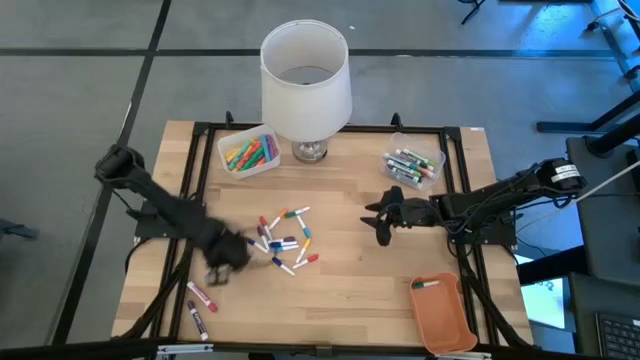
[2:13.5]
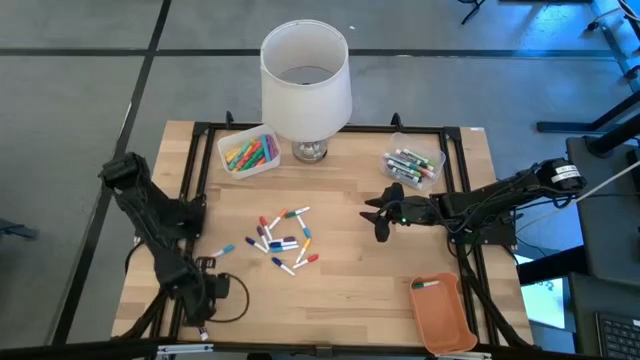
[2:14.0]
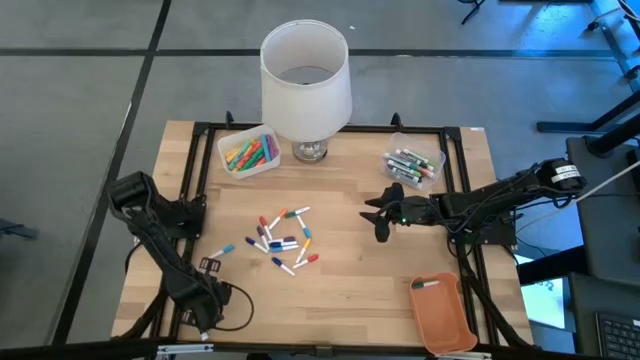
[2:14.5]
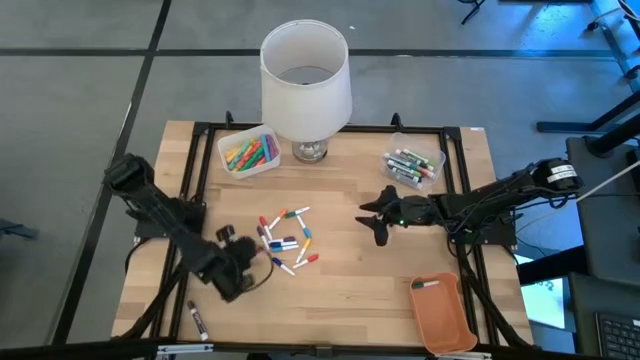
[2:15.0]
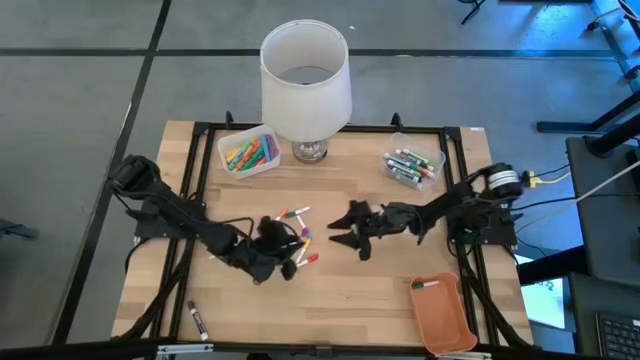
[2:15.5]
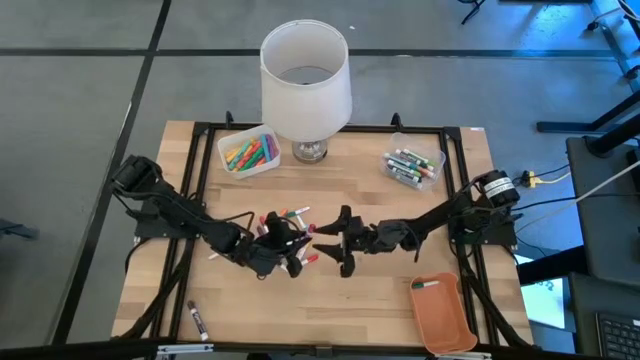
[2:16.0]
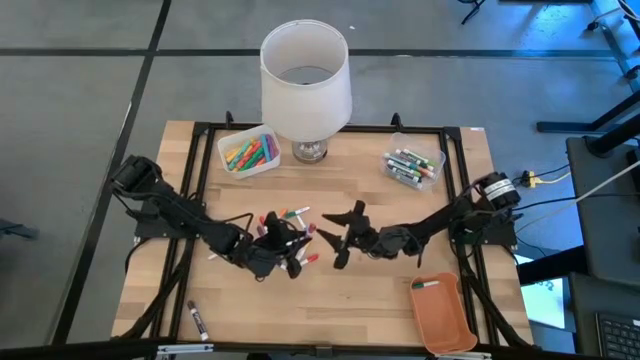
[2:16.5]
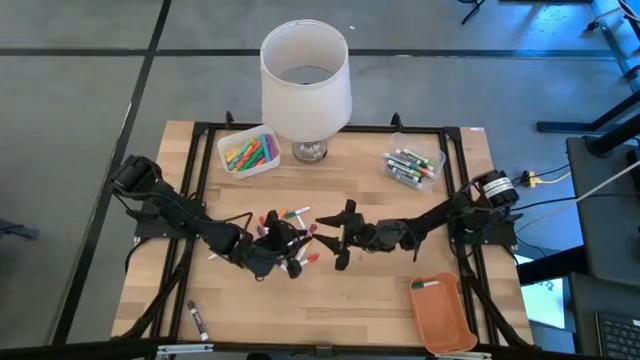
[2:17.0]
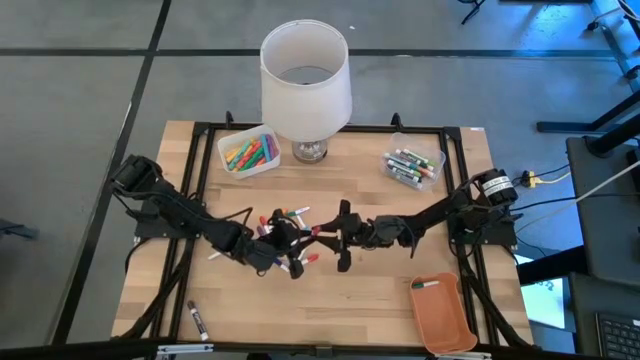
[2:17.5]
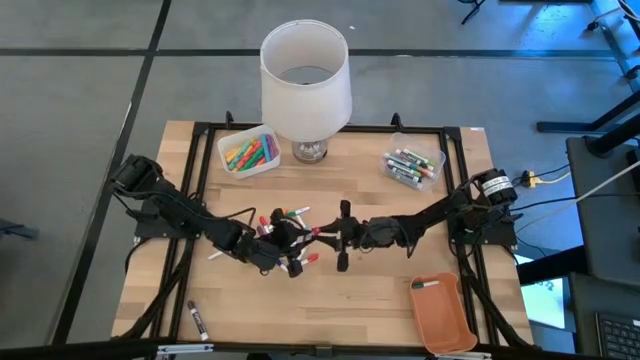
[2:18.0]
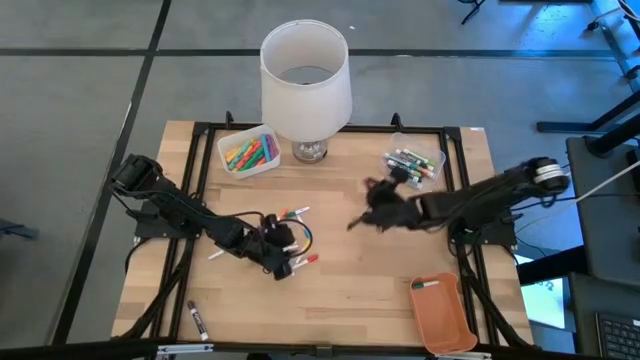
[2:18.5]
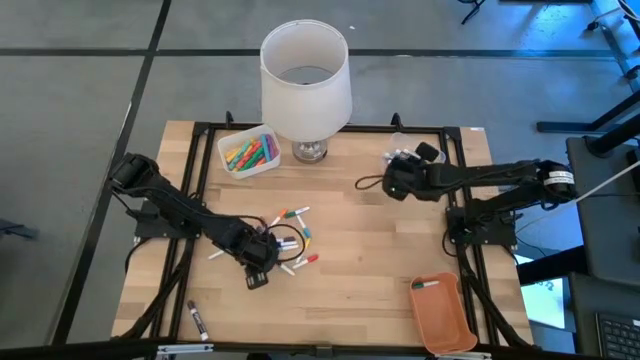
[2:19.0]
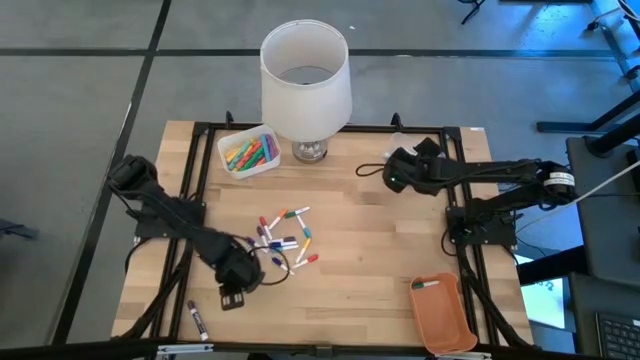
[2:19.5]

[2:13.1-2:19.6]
Task: Pick & Place Markers
Put the thick pink dry erase marker into the transparent bin

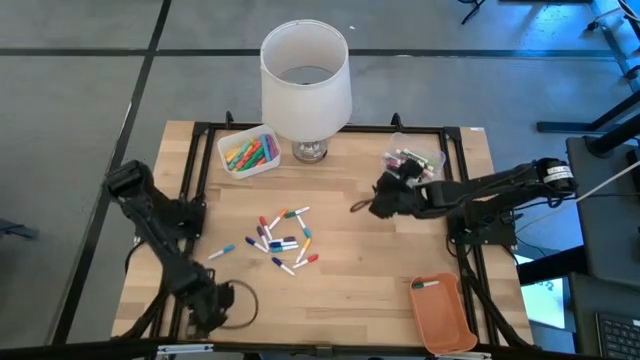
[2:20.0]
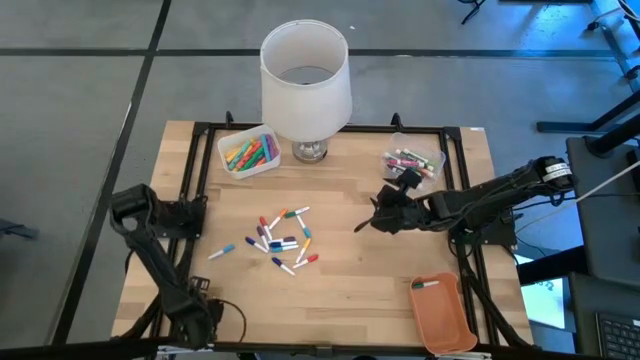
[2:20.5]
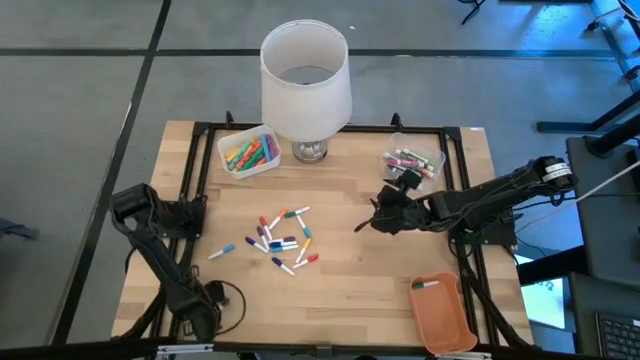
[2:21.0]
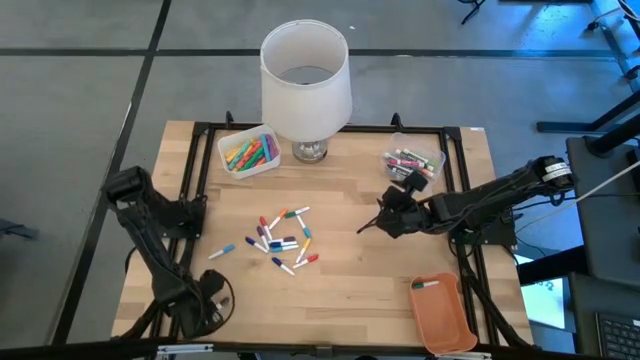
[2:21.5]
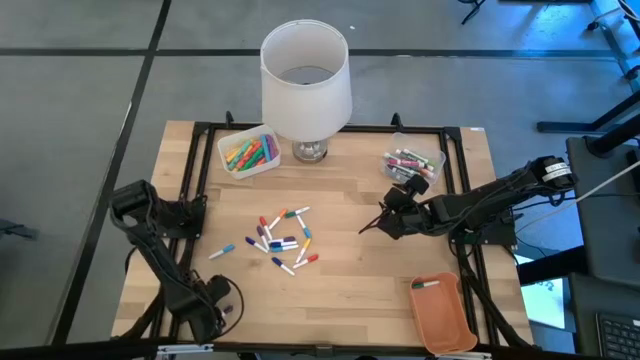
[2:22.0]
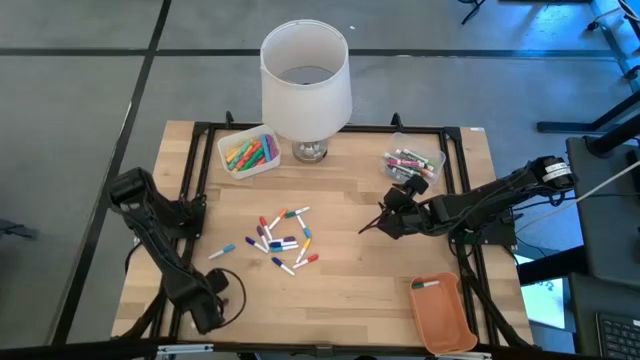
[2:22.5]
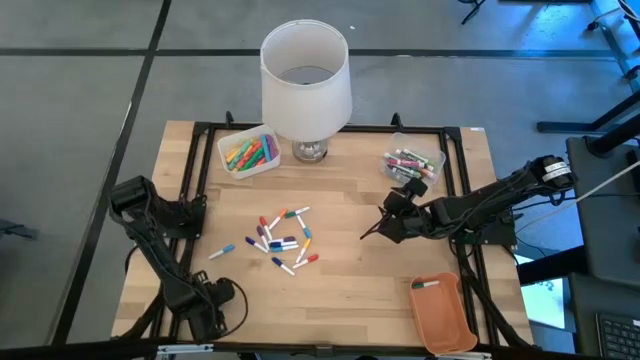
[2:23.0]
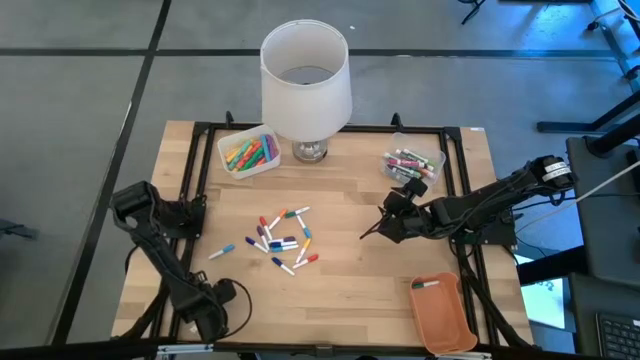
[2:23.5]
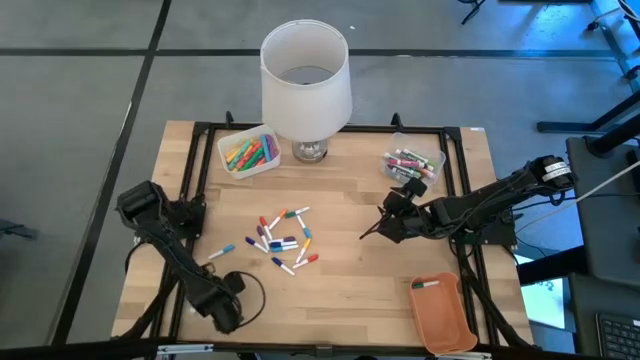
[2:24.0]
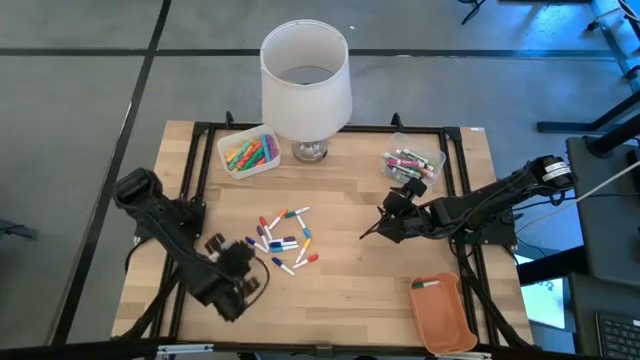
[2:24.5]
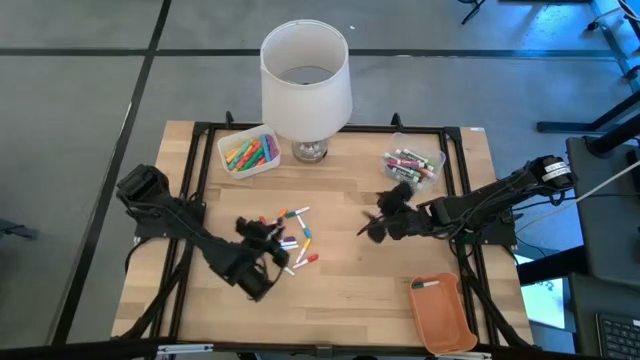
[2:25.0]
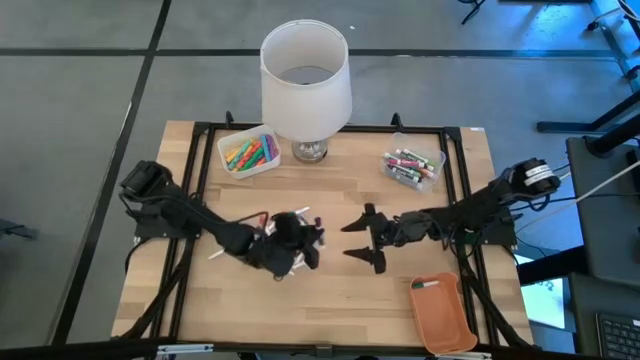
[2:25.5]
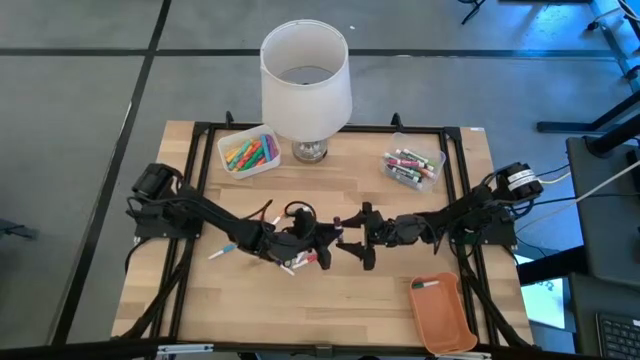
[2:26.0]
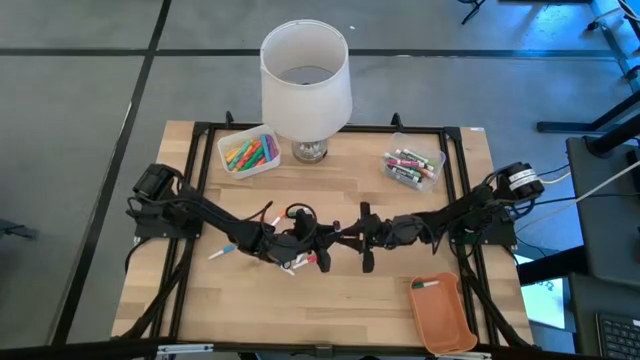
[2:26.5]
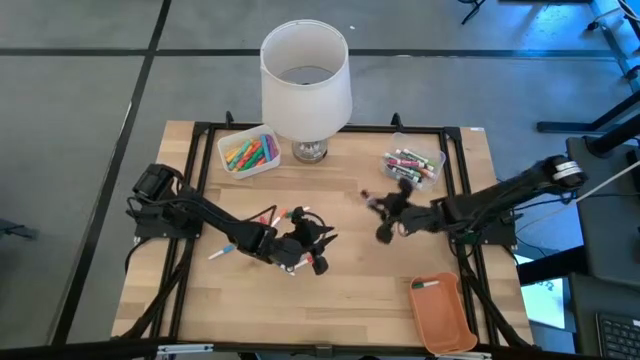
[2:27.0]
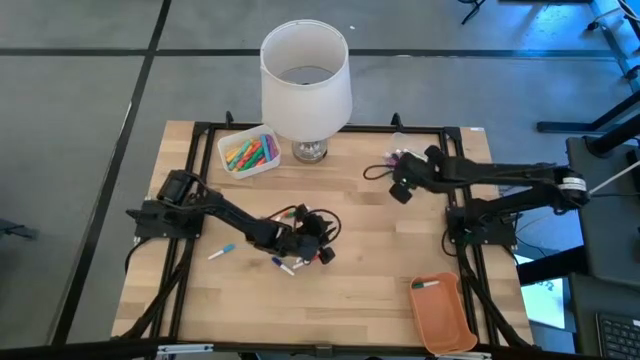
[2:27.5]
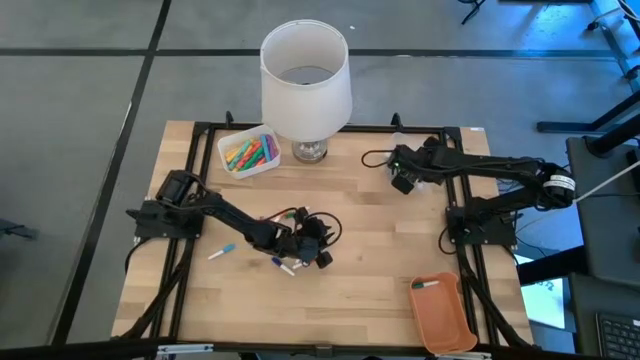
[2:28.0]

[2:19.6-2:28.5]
Put the thick purple dry erase marker into the transparent bin

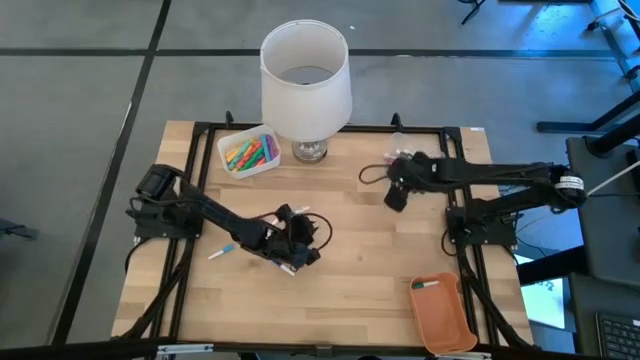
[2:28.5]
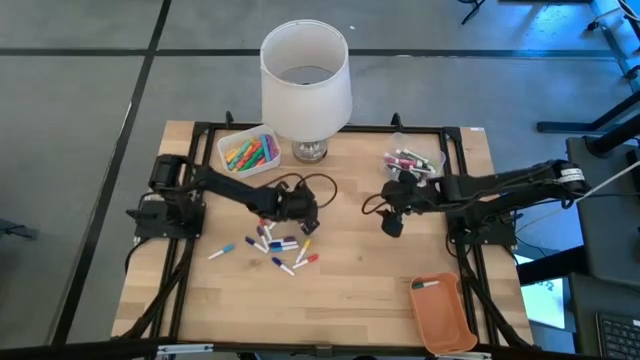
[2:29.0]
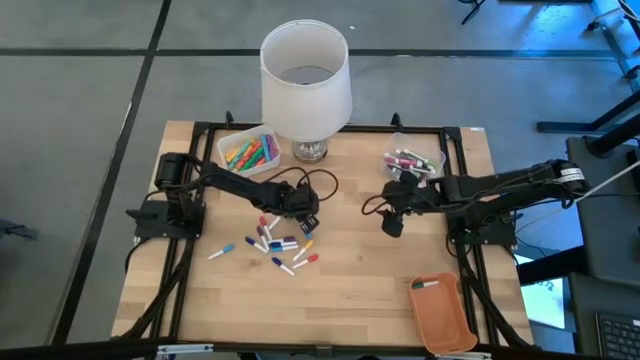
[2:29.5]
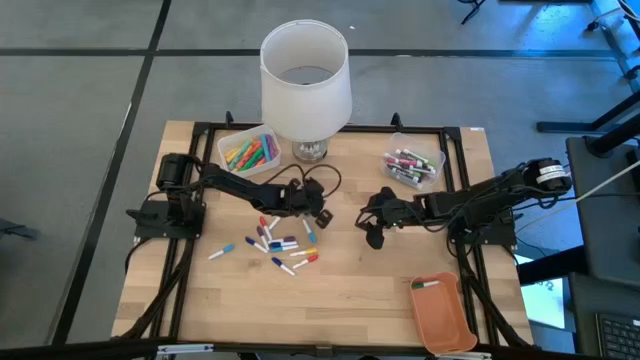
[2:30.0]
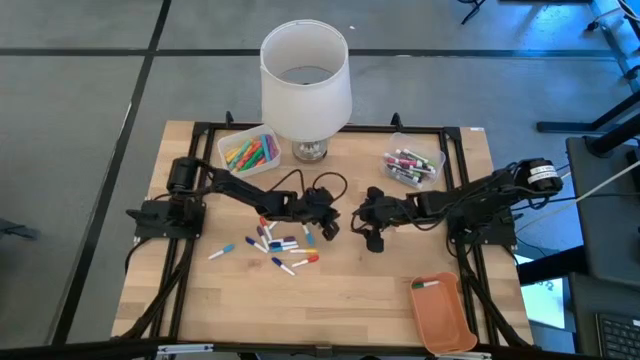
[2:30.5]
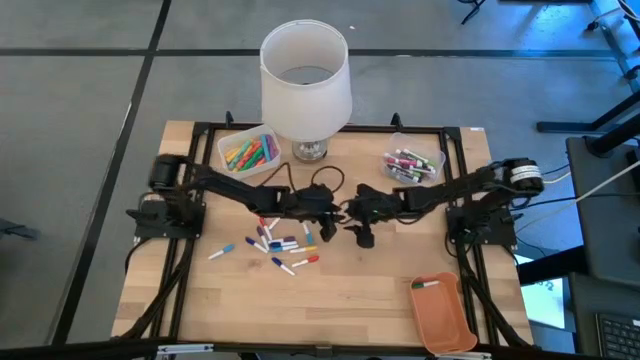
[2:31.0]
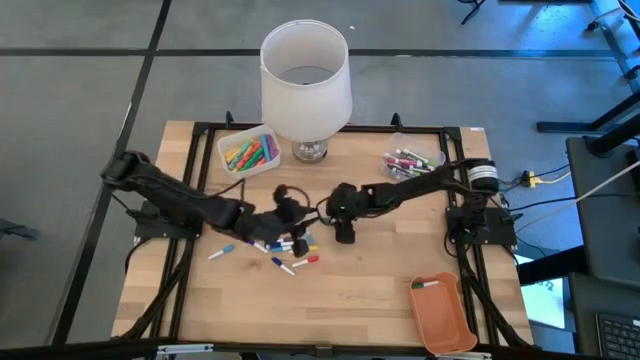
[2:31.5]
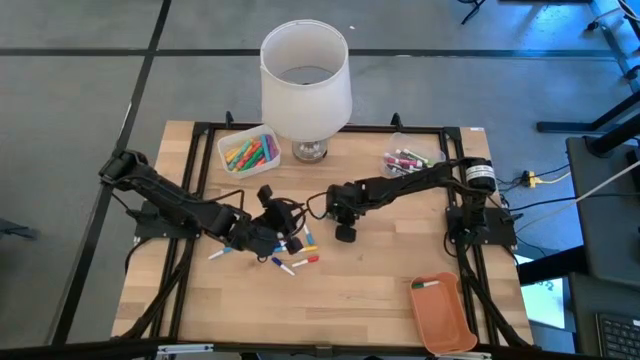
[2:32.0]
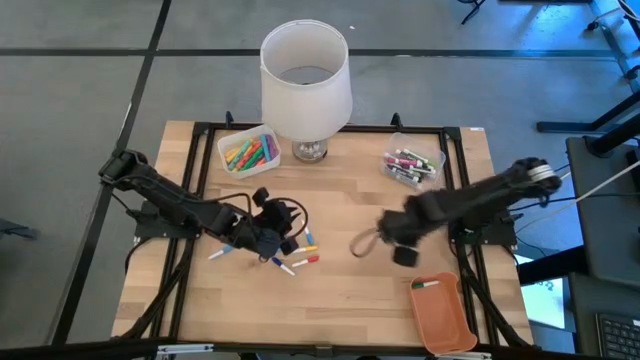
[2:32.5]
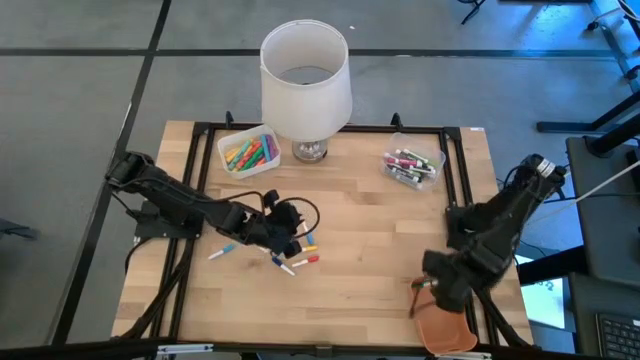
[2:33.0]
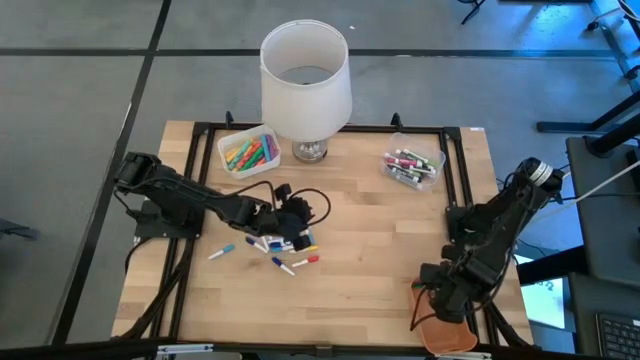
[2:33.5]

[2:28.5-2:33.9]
Put the dark green mini marker into the orange bin

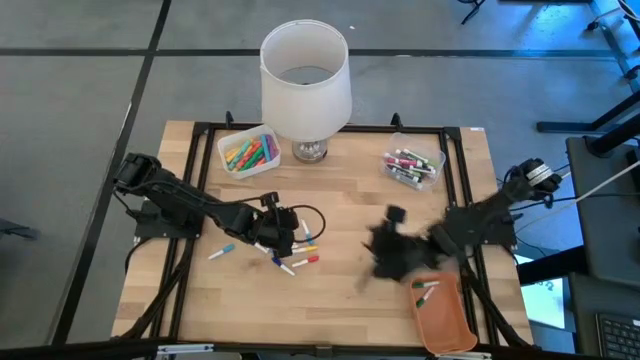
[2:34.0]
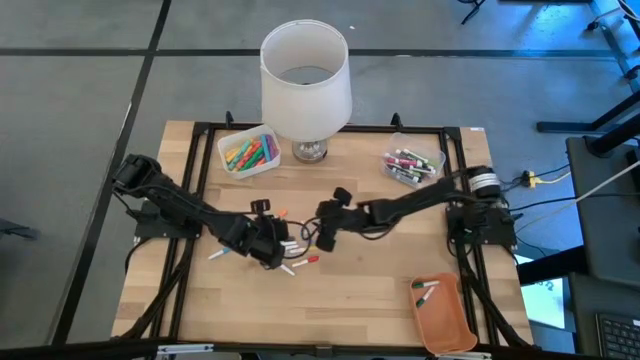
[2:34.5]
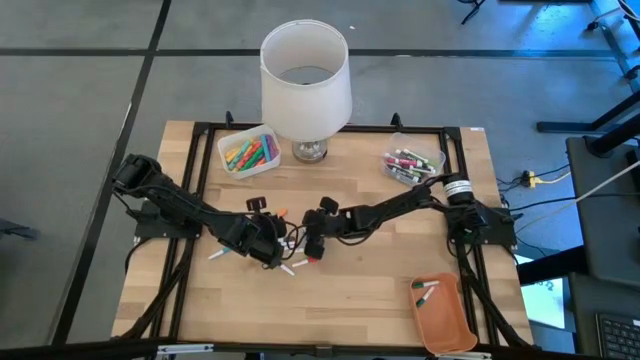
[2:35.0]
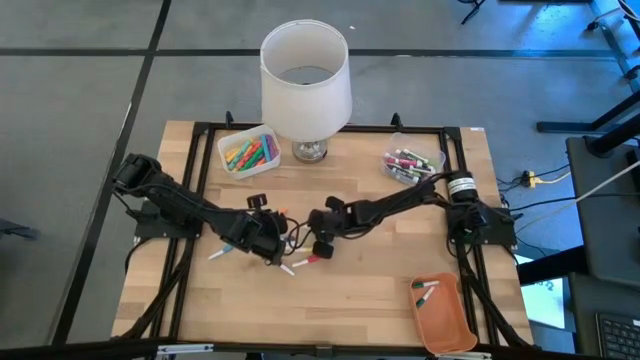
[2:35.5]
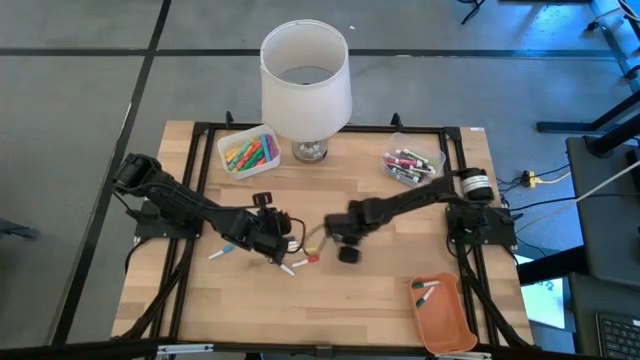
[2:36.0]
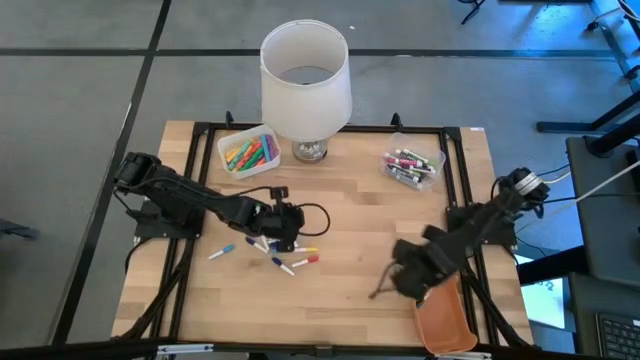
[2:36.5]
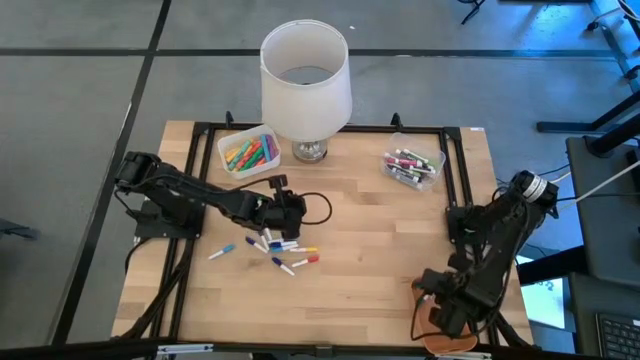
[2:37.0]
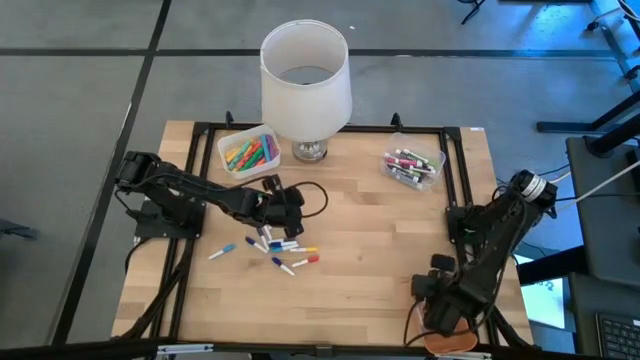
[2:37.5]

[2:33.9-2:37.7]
Put the light blue mini marker into the orange bin
